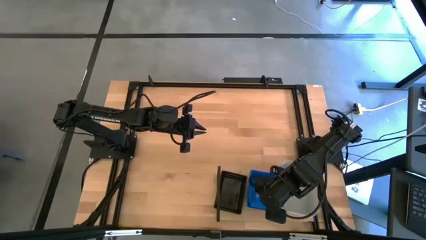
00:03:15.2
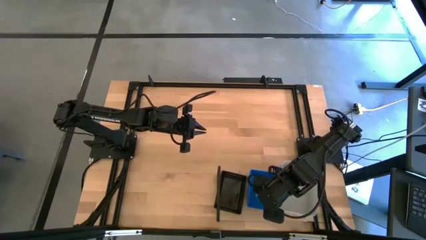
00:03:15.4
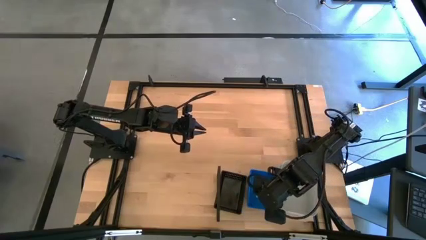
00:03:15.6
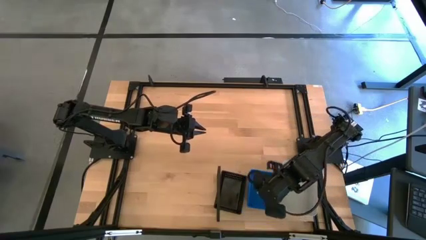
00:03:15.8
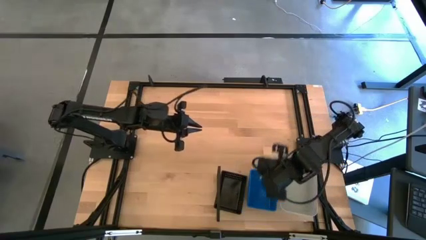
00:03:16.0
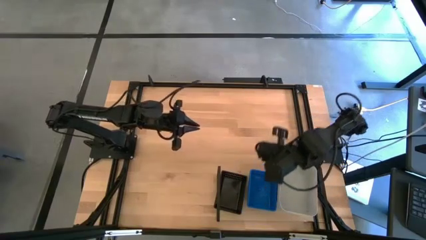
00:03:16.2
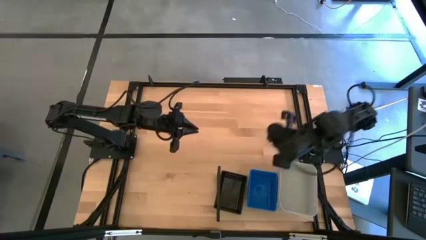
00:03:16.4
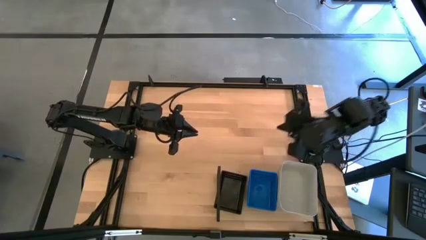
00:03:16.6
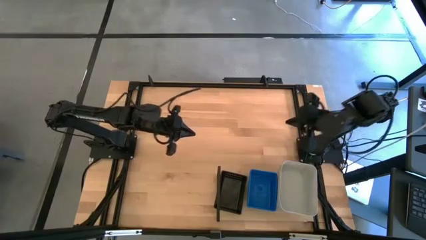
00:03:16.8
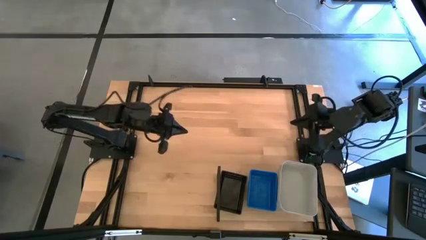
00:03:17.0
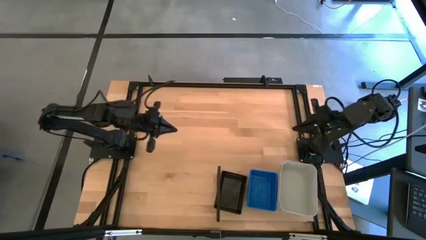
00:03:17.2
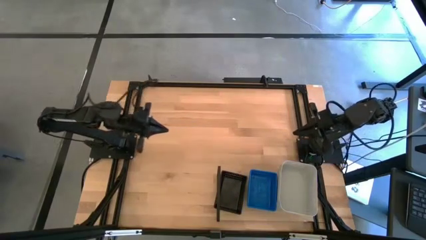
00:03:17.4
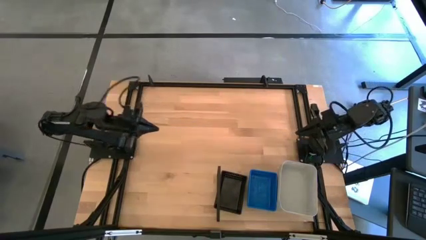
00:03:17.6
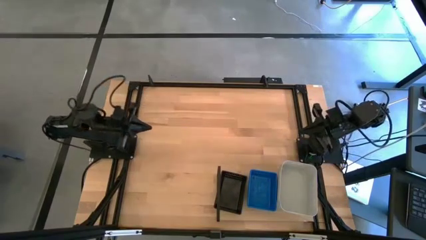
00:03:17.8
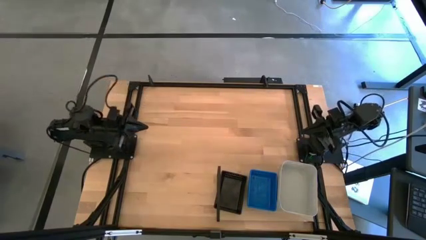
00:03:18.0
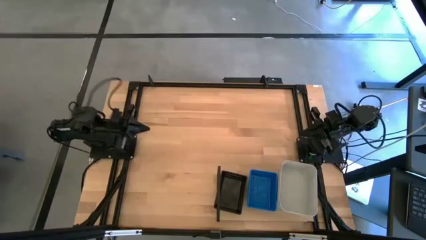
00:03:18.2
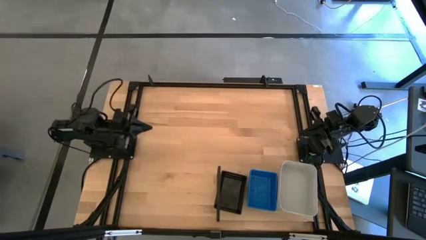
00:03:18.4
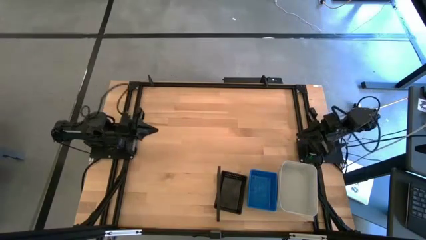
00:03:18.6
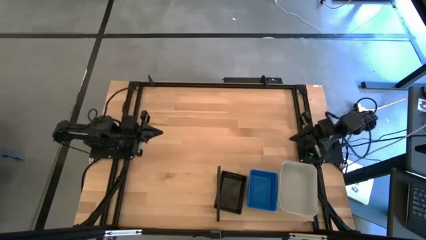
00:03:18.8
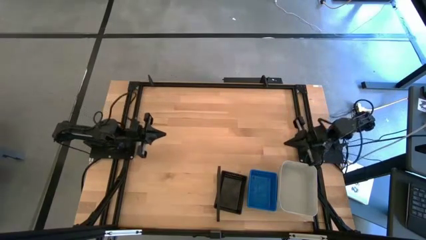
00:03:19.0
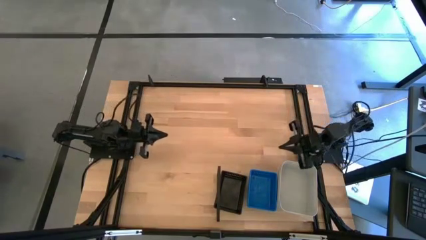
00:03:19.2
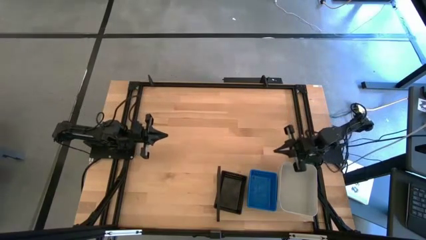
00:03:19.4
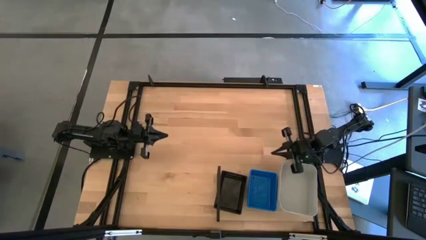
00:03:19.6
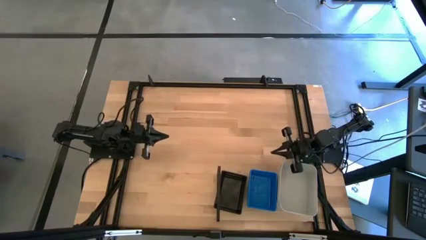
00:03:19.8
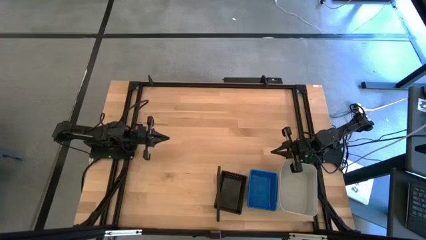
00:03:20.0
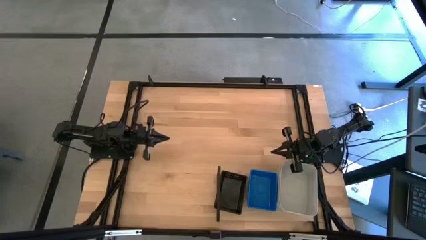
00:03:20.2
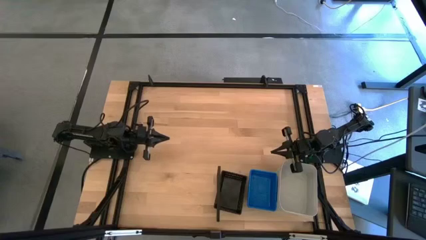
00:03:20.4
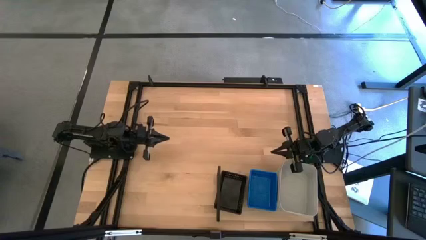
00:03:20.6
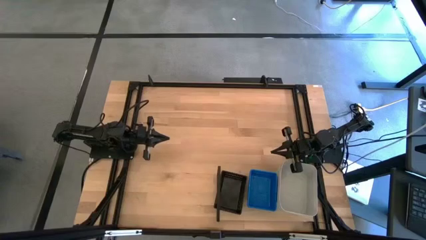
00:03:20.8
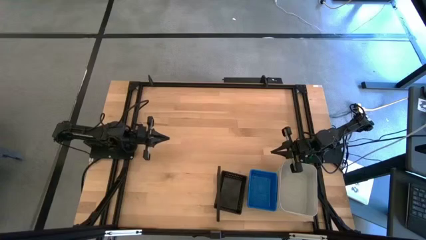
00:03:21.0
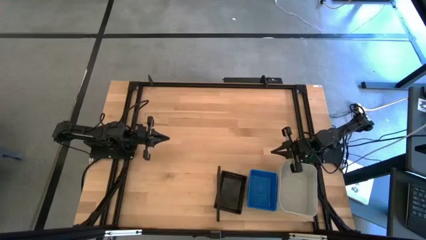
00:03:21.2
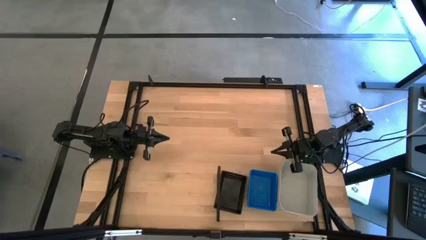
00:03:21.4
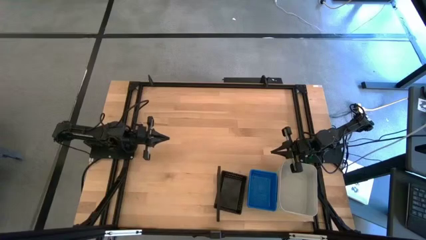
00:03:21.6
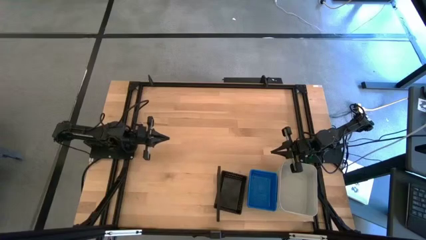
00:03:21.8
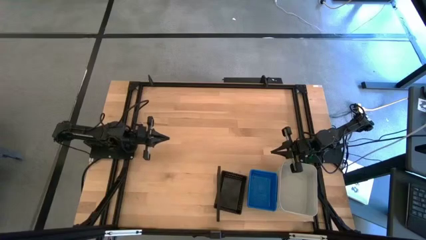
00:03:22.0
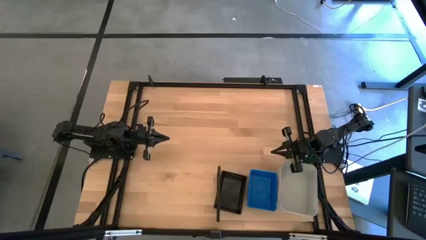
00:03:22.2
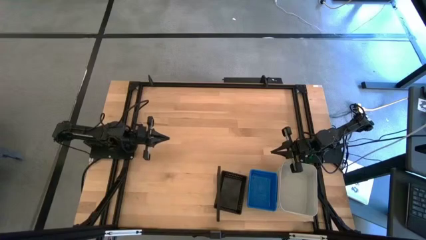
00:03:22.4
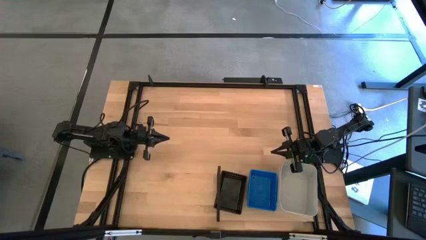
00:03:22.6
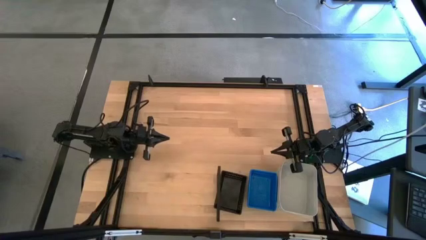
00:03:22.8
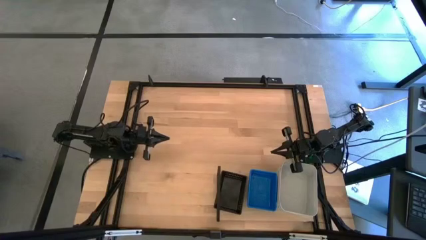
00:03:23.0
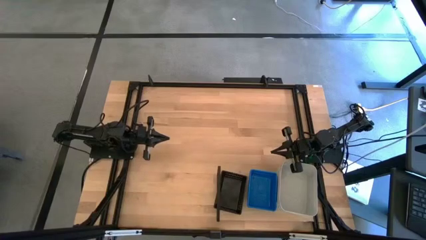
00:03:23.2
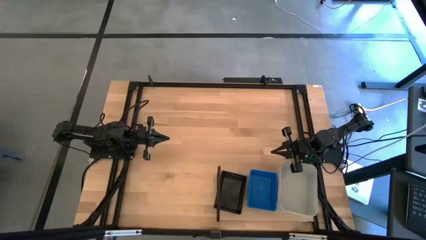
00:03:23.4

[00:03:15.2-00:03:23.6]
Task: Stack baskets on shelf by color
Return to Home Position

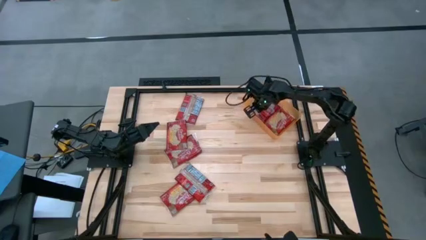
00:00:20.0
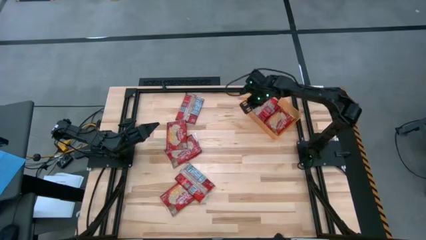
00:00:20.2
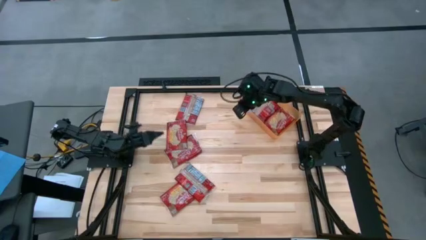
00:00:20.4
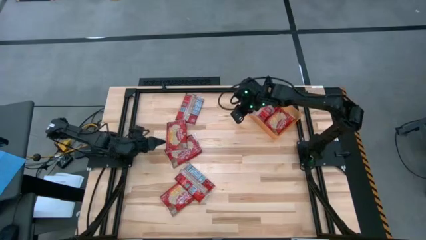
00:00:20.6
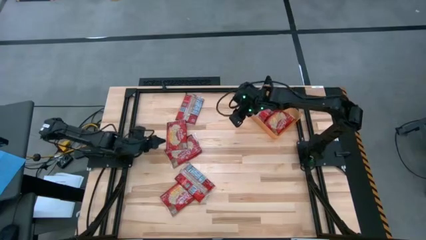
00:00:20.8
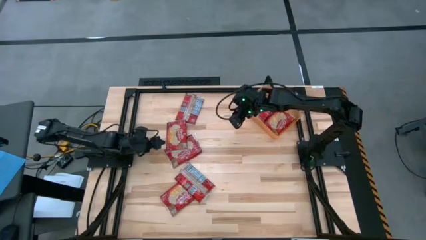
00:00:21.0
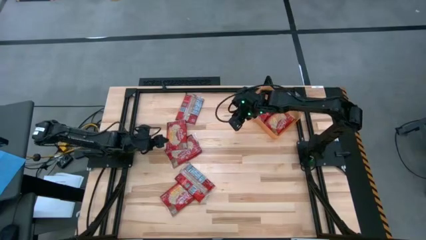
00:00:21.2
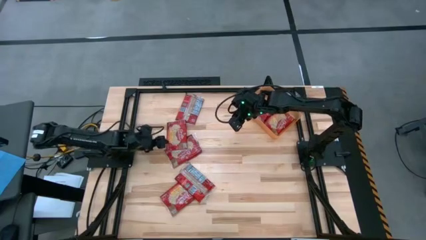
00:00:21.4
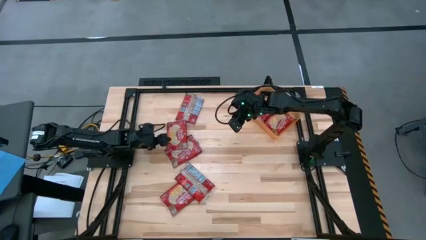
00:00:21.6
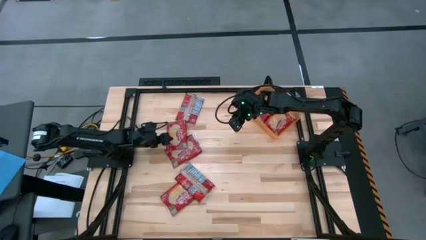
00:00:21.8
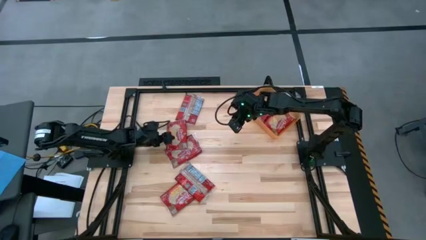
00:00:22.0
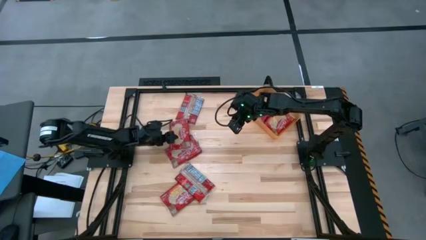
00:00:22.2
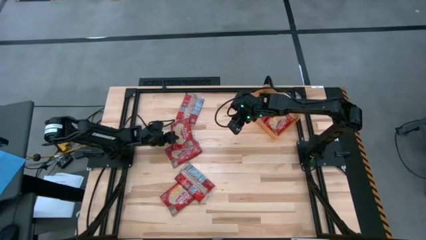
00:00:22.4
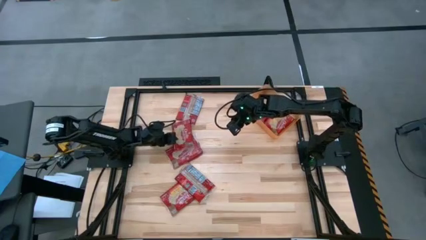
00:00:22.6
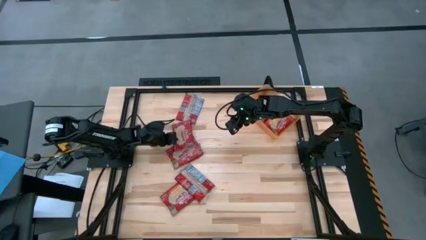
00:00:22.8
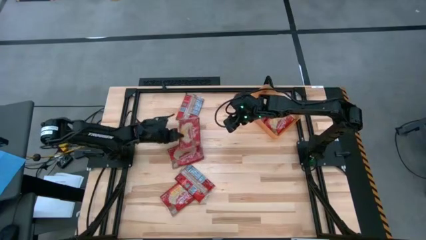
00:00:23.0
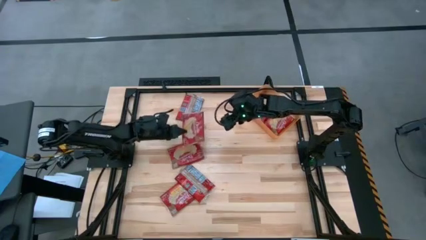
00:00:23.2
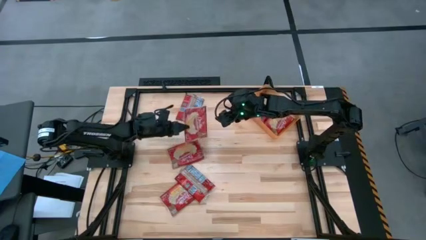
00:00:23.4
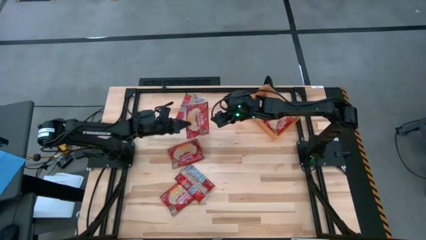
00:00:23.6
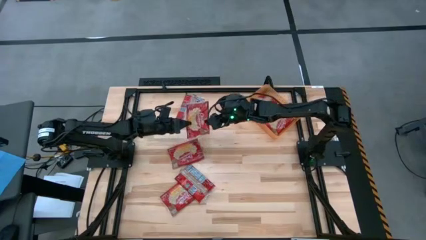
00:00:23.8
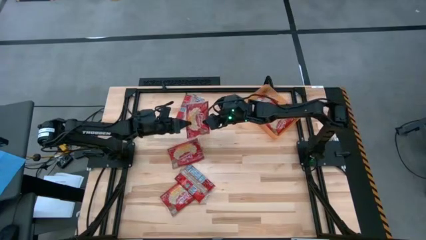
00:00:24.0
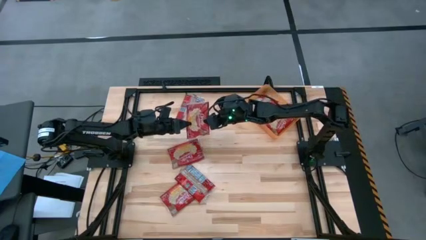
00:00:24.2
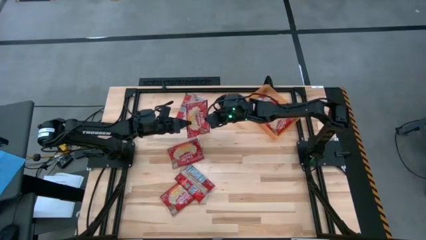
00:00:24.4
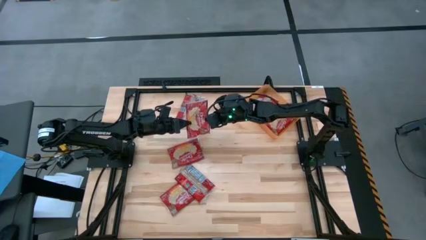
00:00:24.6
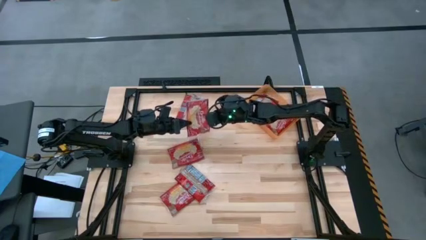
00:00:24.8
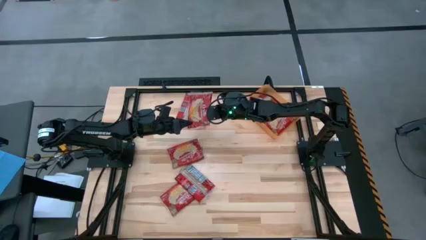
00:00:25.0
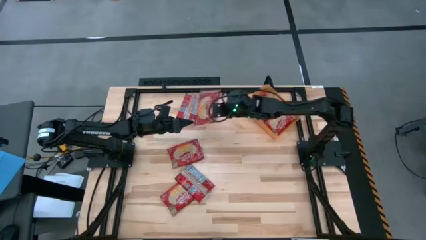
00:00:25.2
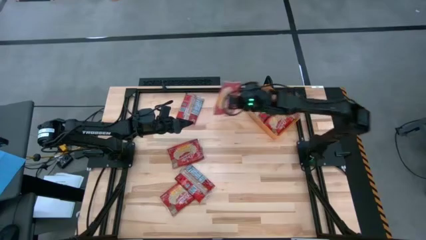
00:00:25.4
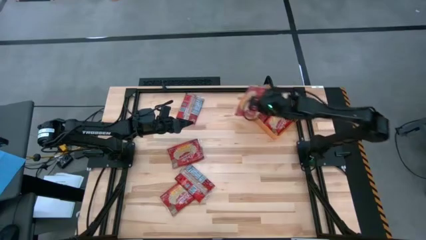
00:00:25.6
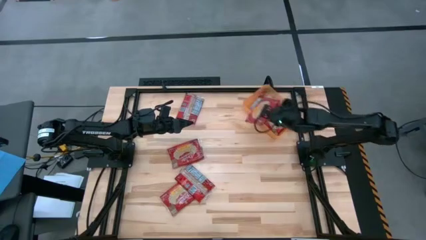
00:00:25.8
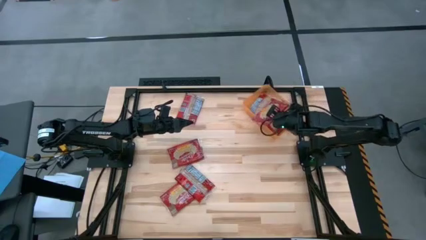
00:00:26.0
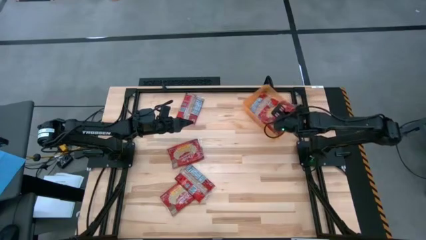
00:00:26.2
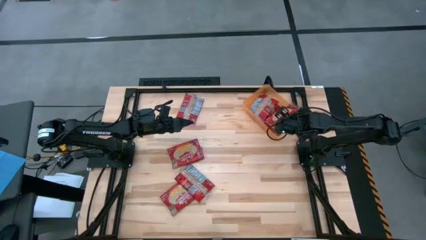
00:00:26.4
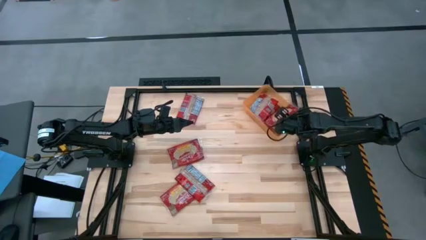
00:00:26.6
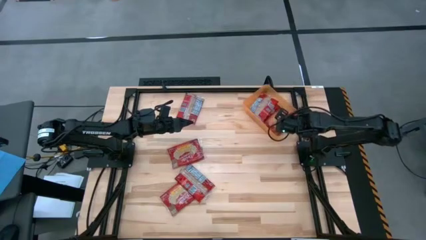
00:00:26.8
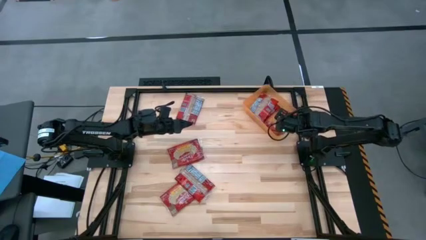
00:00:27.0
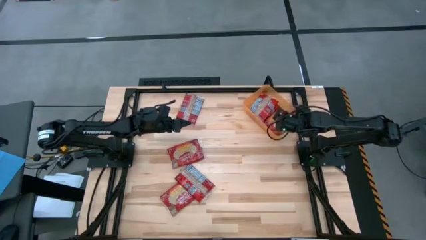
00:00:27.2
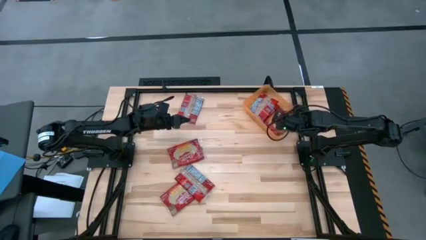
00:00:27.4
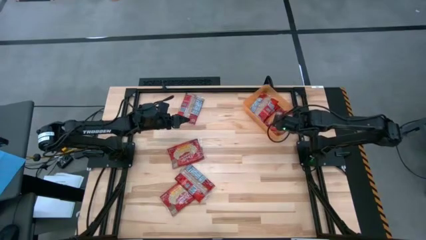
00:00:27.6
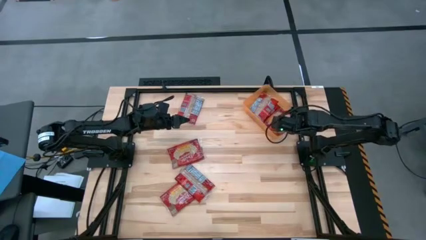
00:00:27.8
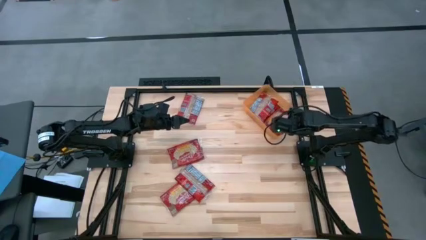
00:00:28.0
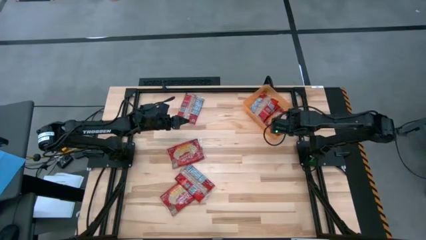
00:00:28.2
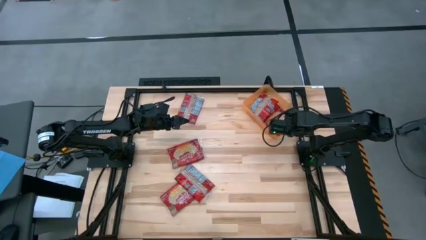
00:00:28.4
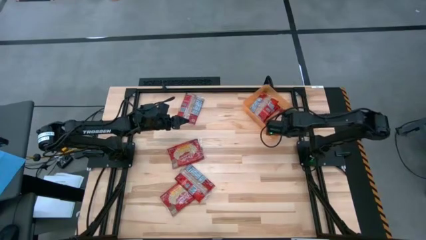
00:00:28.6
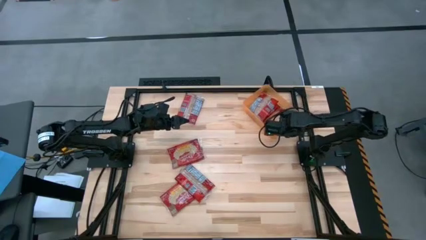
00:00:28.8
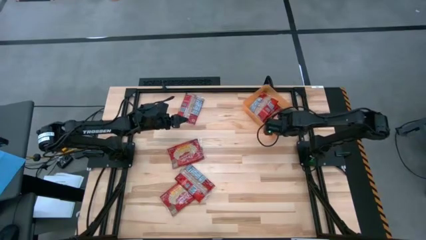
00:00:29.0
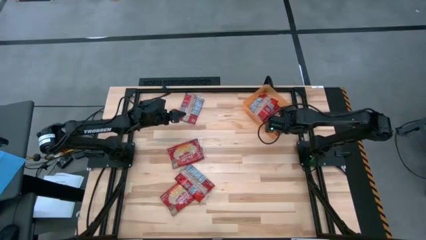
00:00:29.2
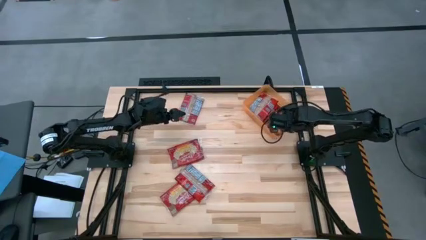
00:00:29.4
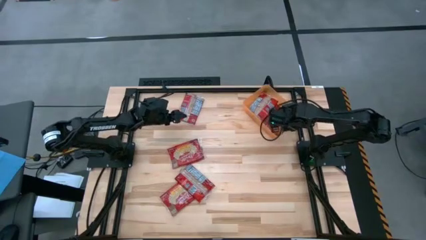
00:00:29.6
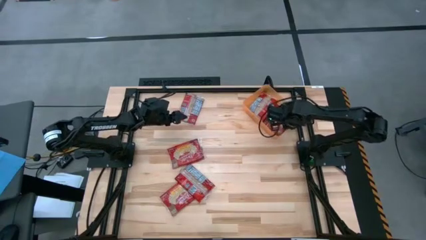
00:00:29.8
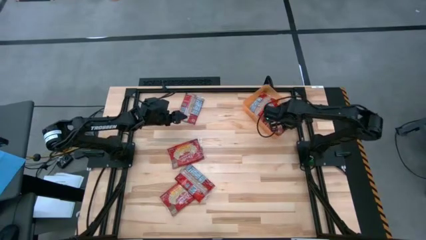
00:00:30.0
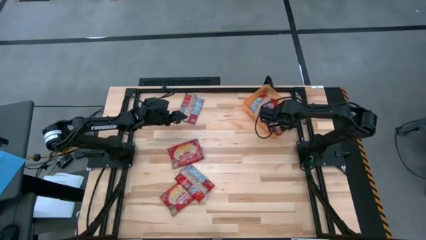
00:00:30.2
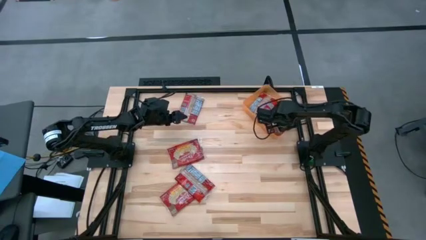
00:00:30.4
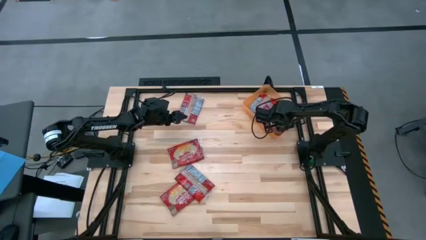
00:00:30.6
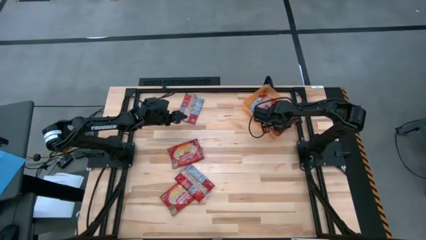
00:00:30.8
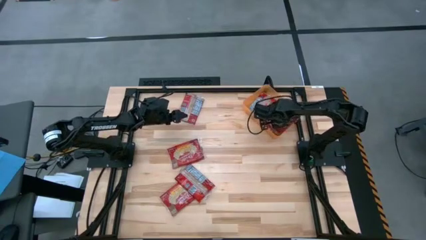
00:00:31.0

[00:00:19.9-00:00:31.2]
Task: Sort popcorn bags into baskets
Put the red popcorn bag into the orange bin
